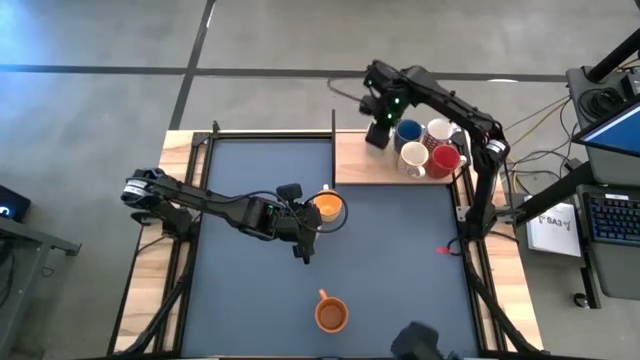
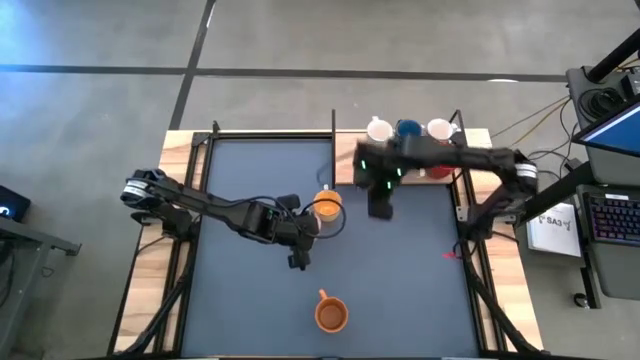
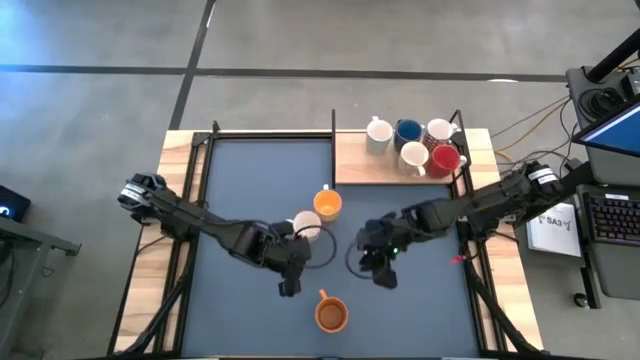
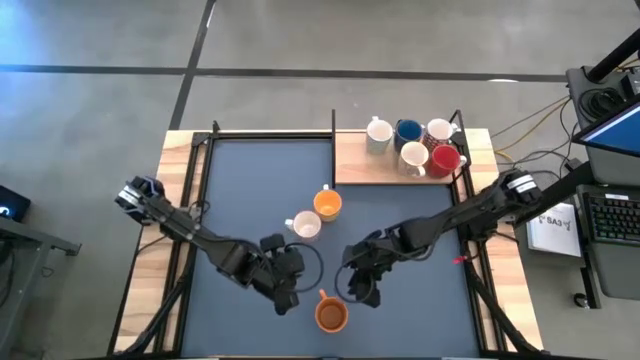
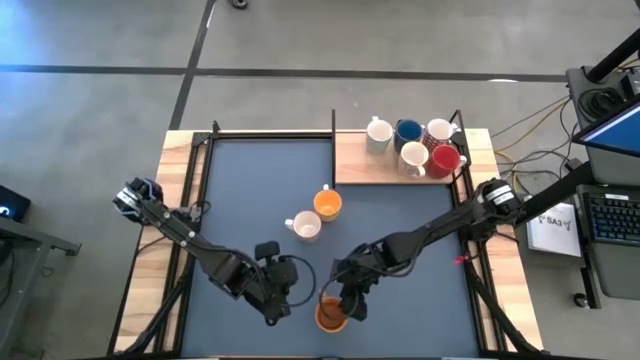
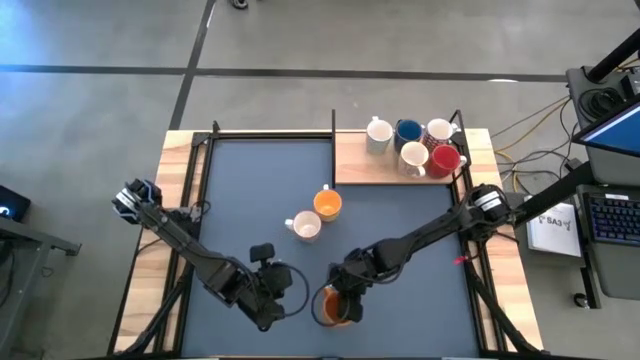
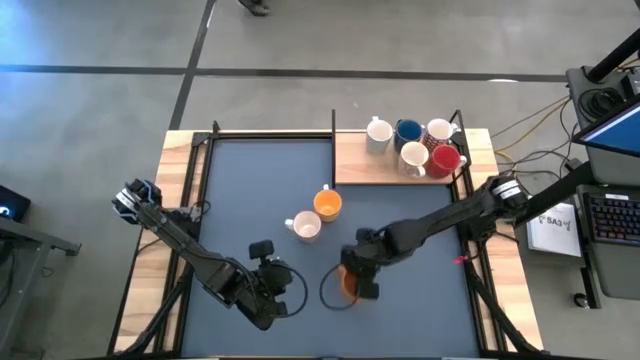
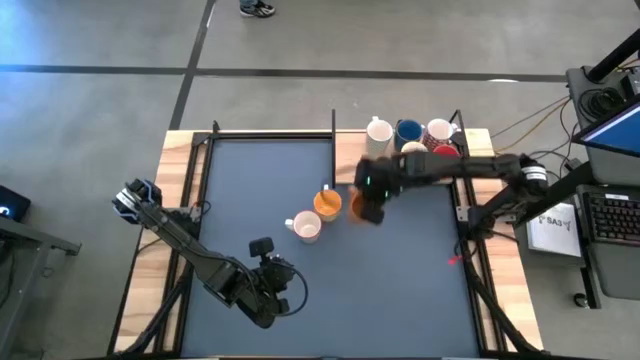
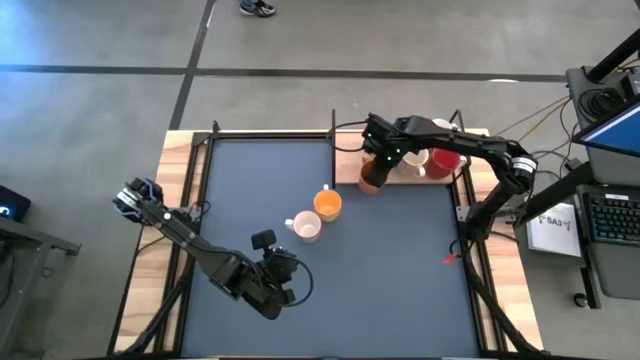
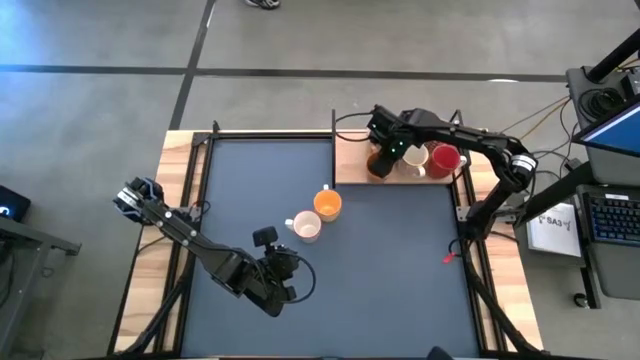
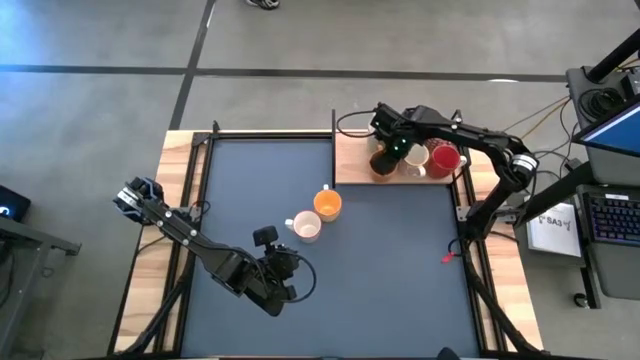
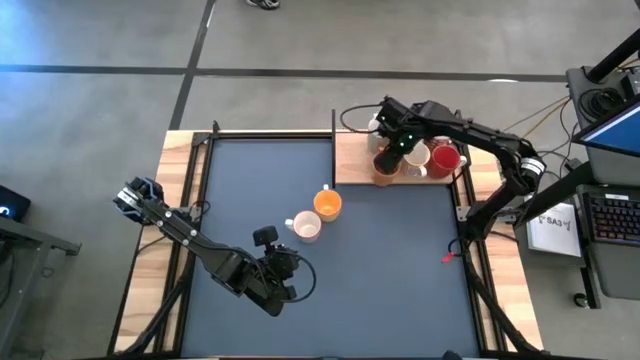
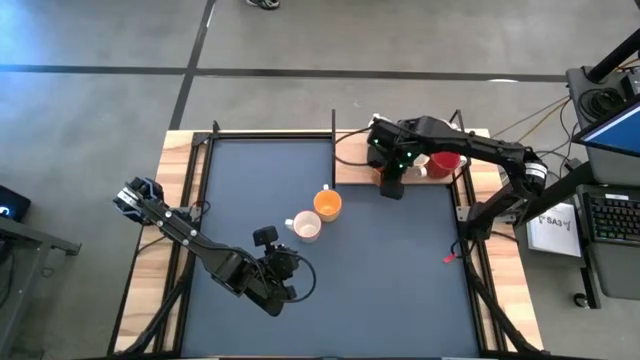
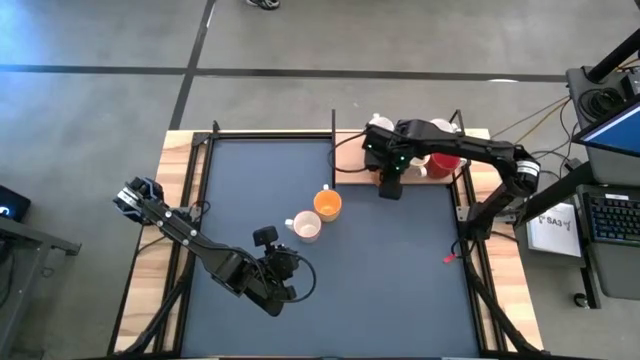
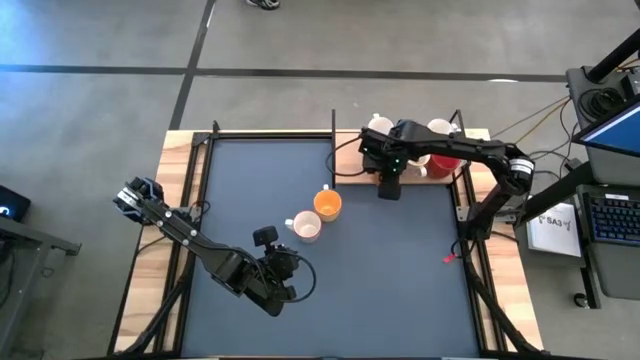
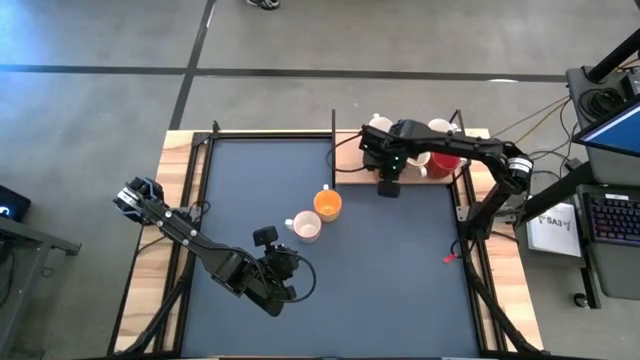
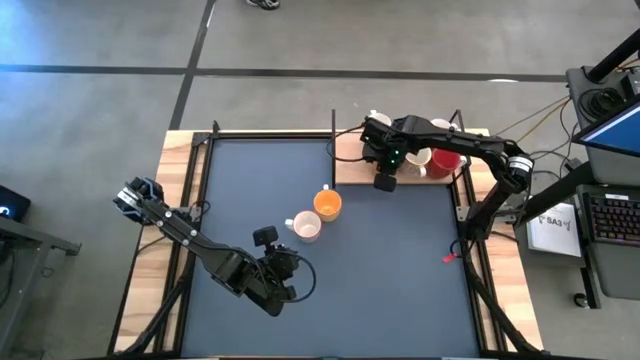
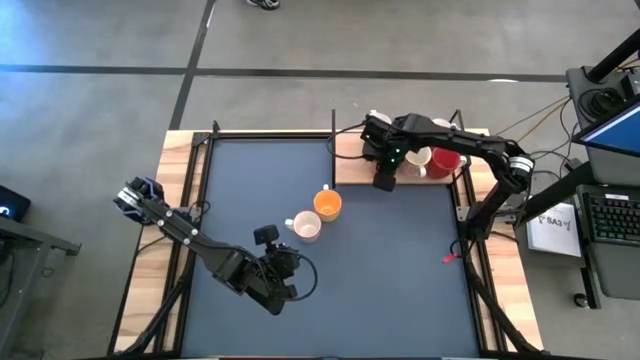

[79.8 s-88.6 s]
Task: Place coffee mugs
Put the orange mug on the shelf

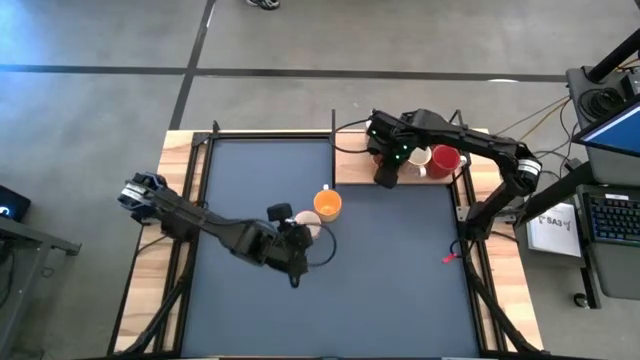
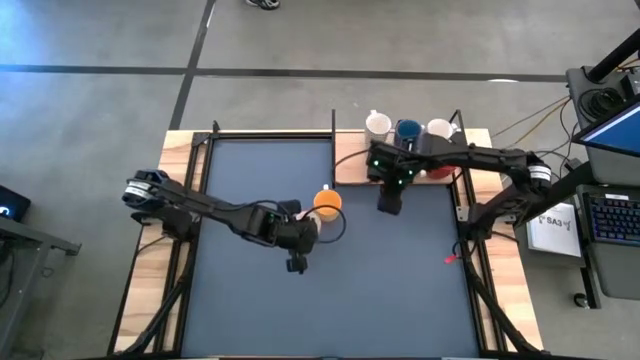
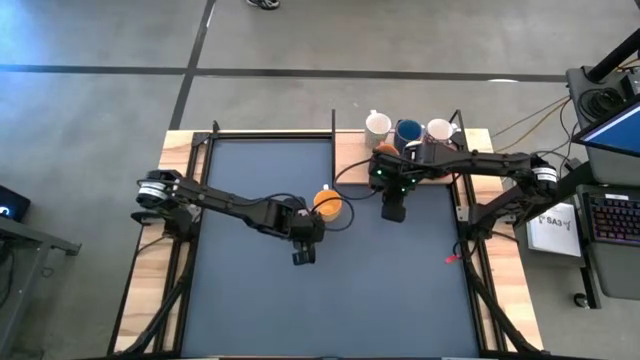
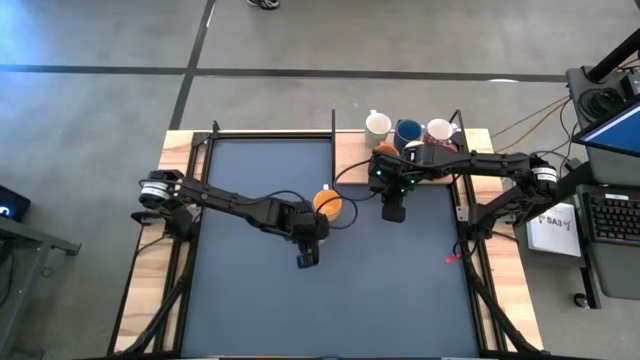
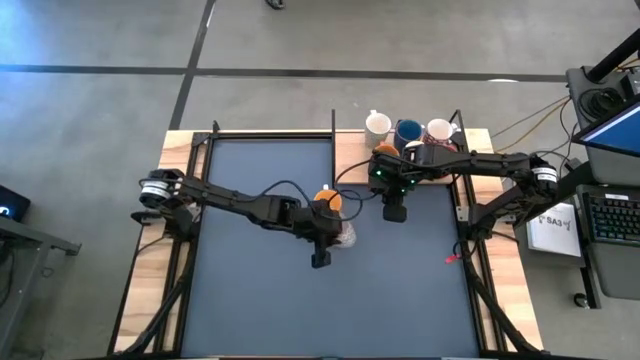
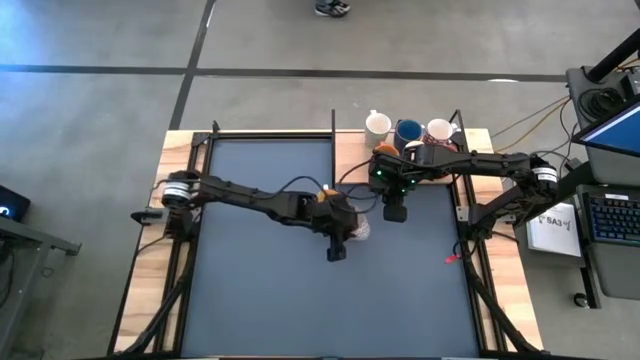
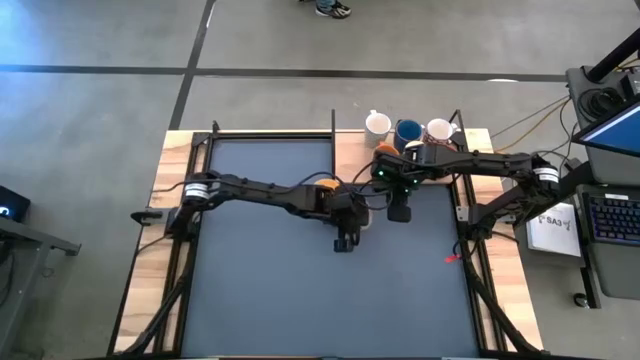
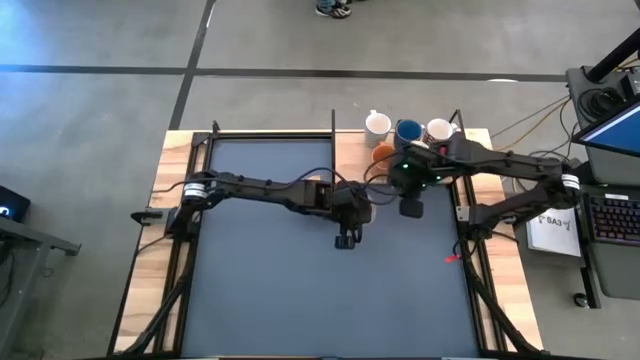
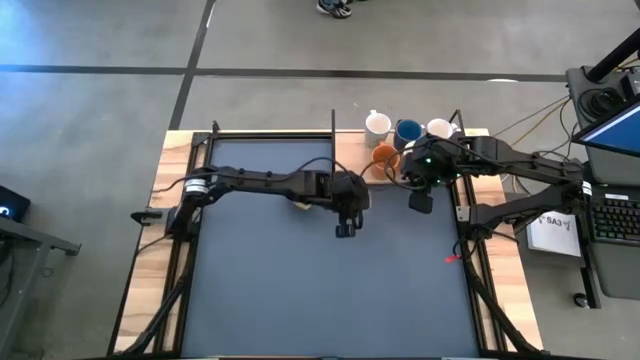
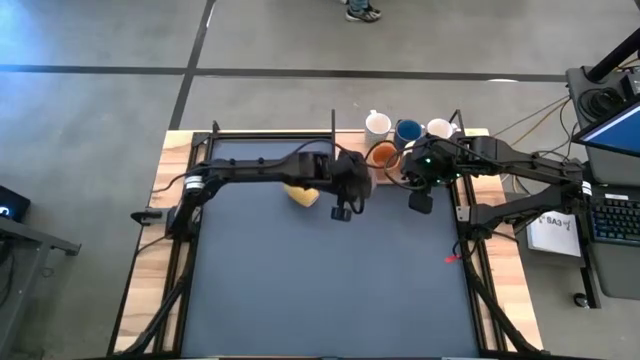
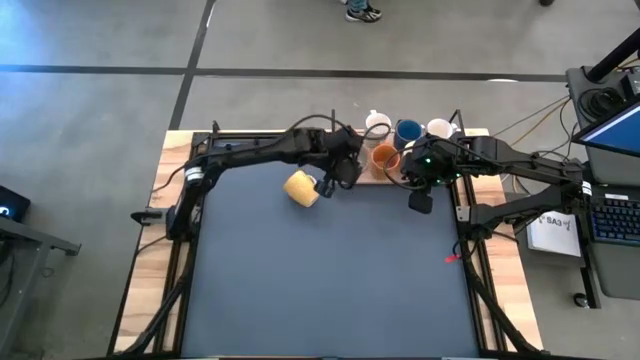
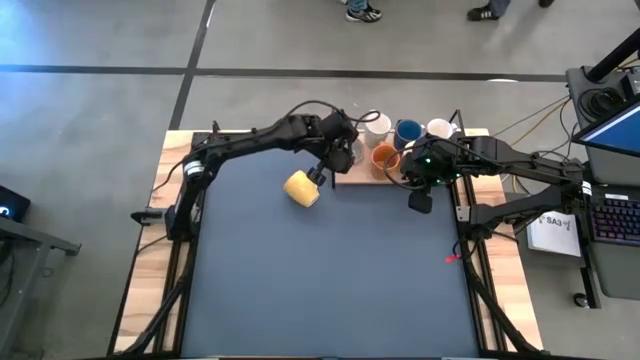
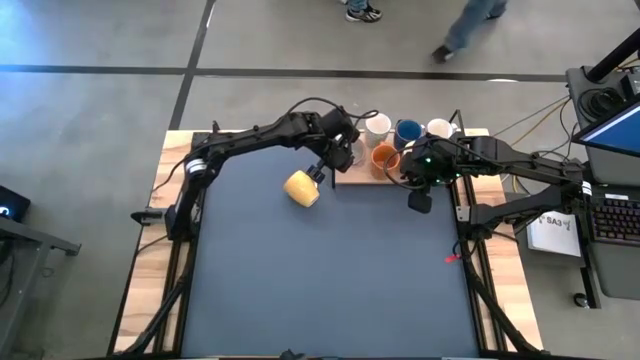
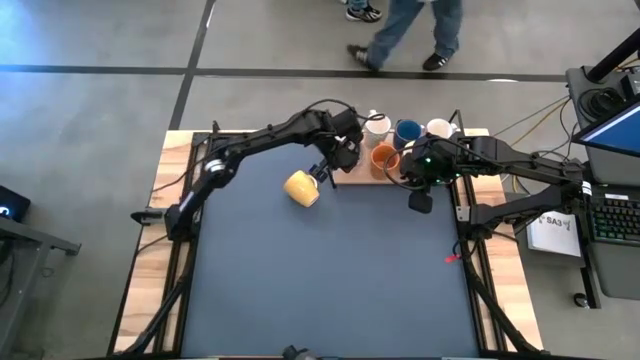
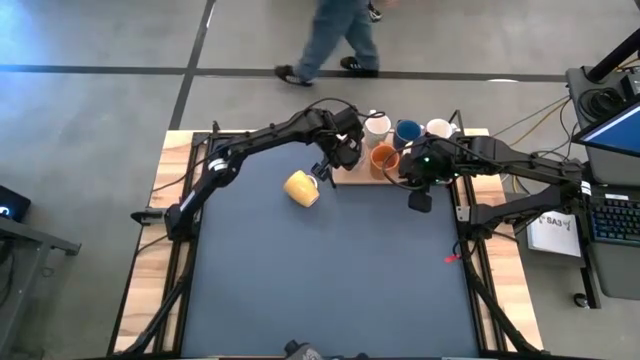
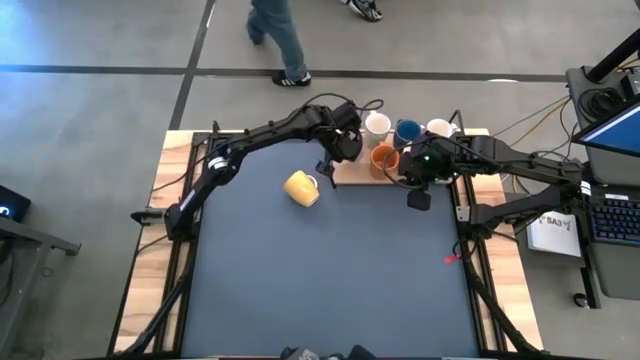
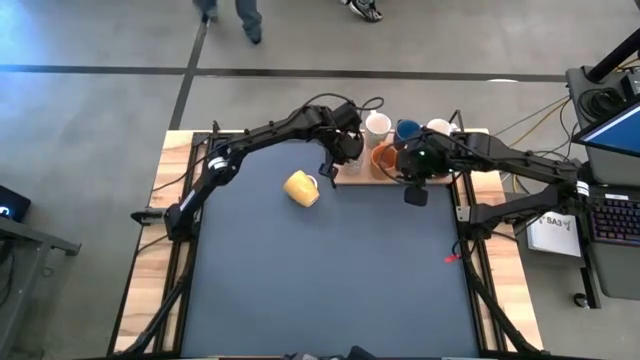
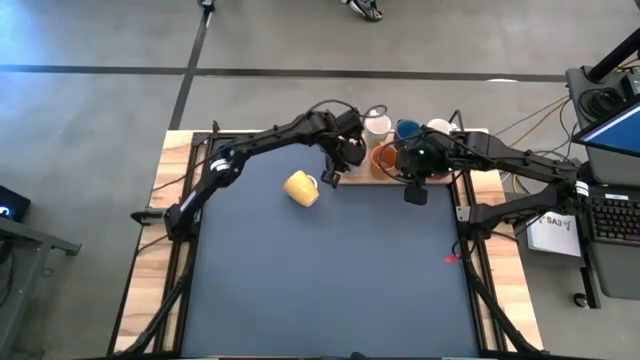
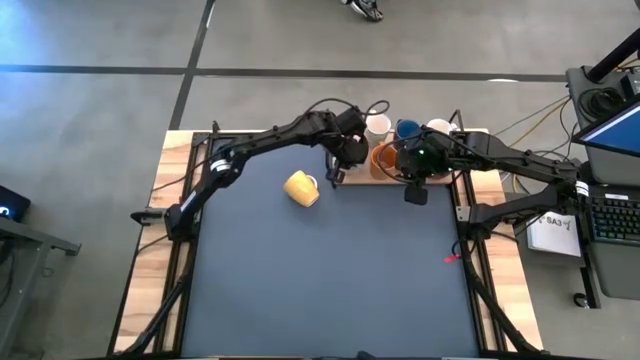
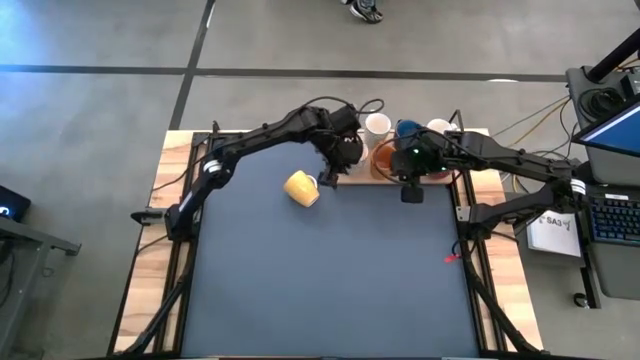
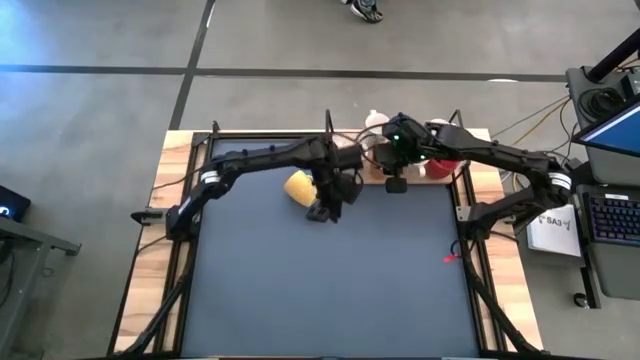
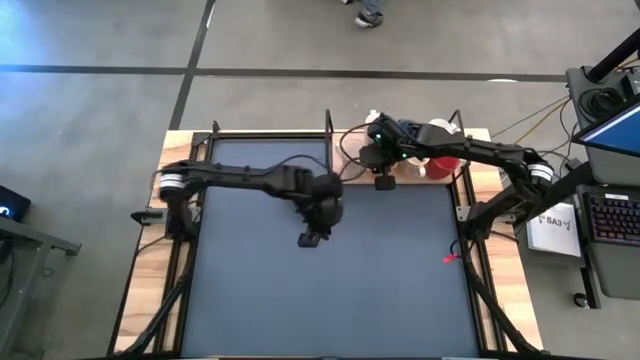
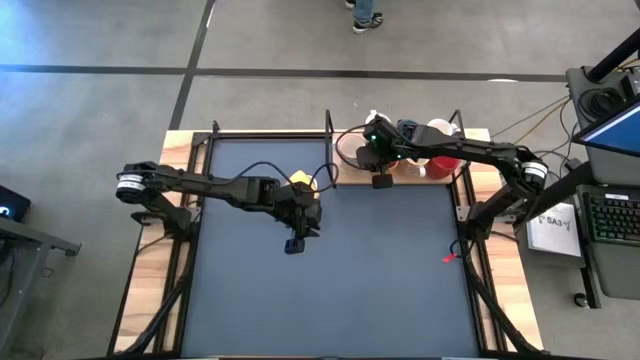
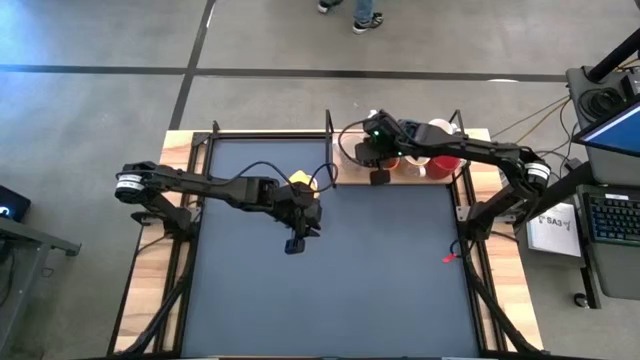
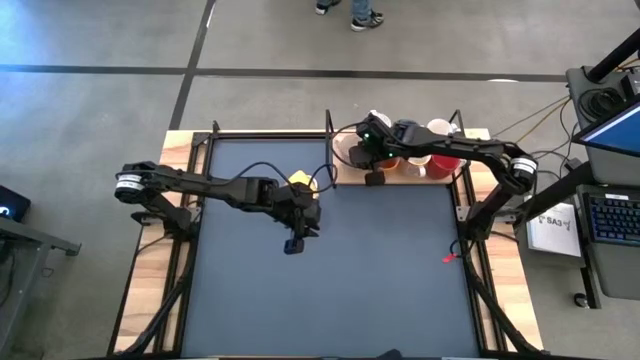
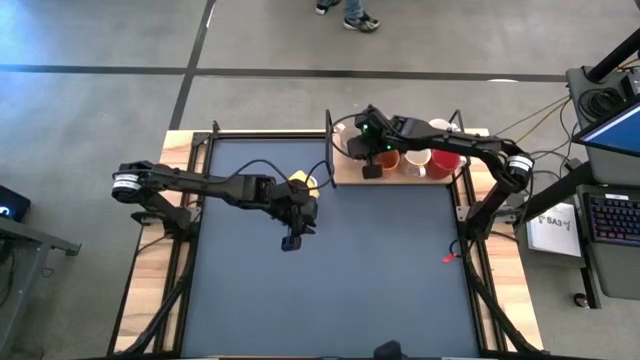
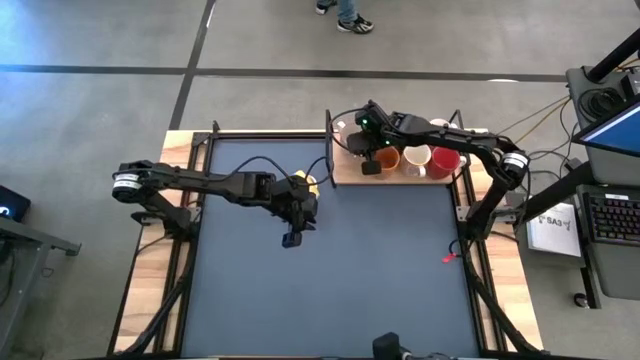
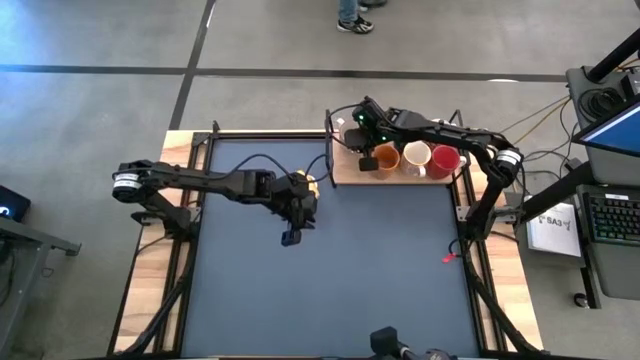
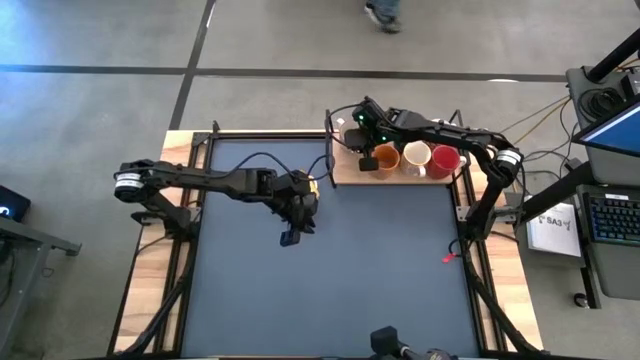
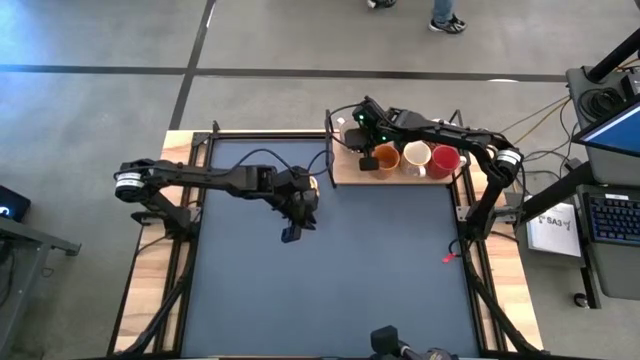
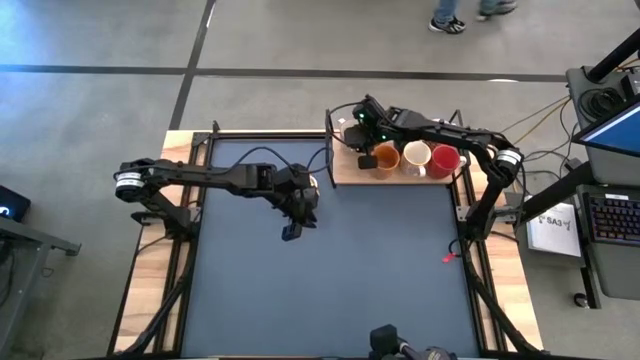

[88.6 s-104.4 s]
Put the gray patterned mug on the shelf
